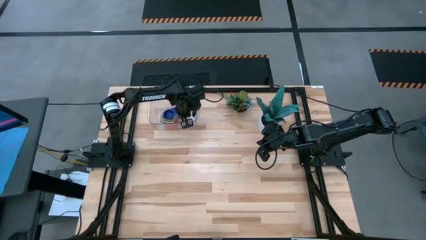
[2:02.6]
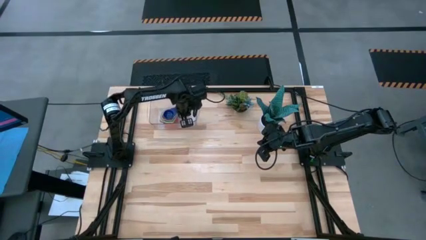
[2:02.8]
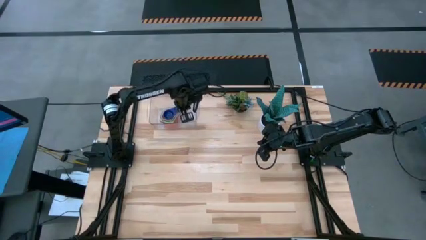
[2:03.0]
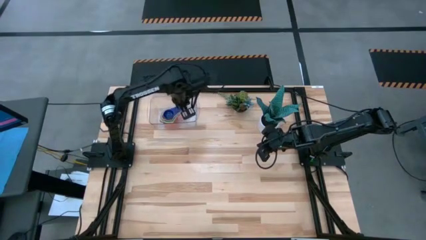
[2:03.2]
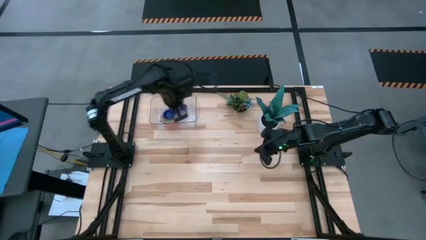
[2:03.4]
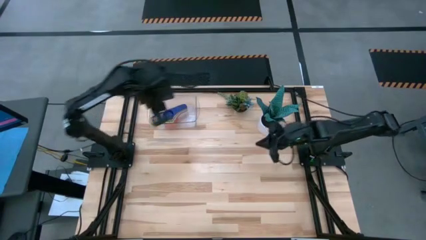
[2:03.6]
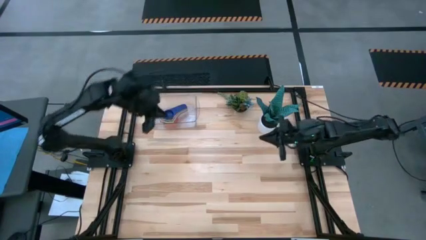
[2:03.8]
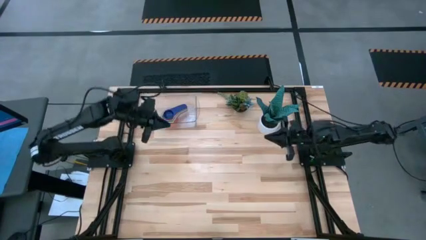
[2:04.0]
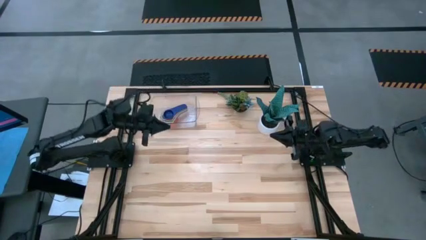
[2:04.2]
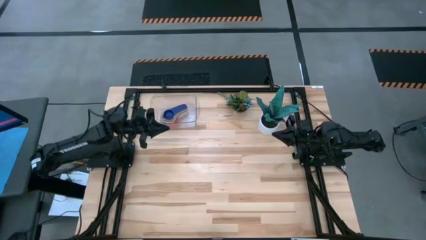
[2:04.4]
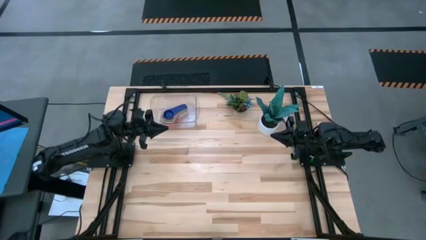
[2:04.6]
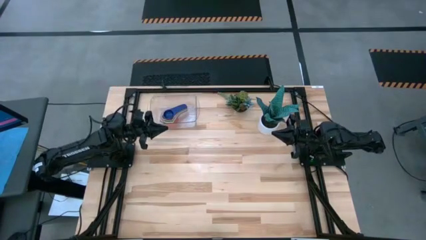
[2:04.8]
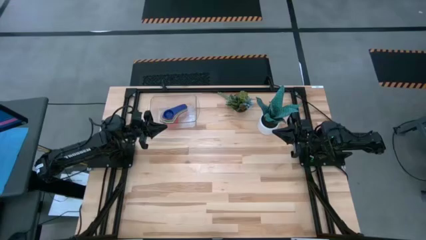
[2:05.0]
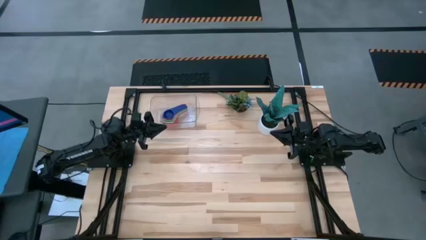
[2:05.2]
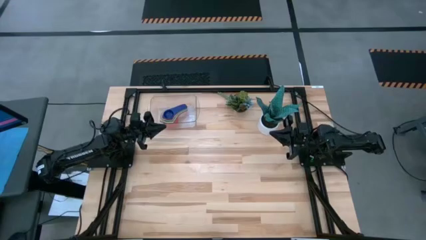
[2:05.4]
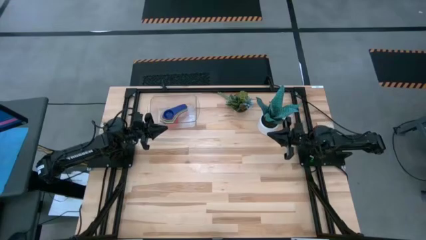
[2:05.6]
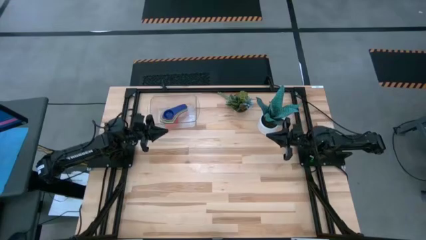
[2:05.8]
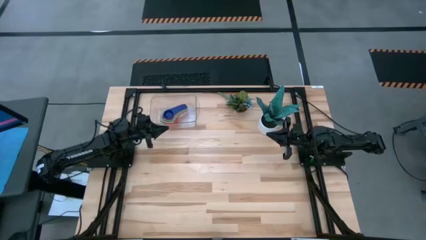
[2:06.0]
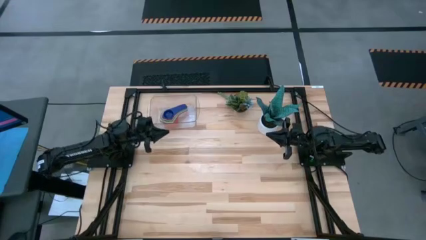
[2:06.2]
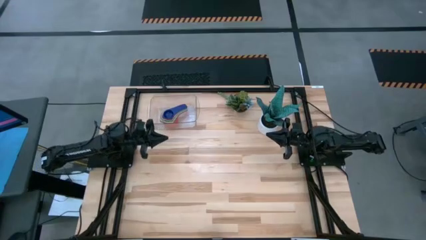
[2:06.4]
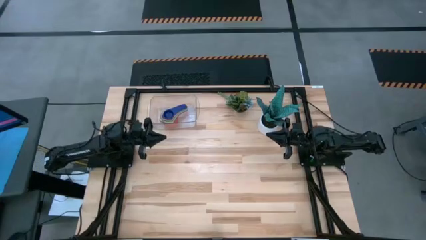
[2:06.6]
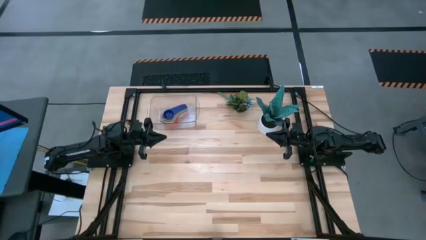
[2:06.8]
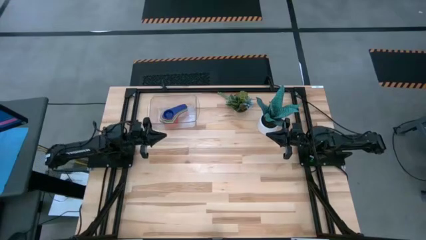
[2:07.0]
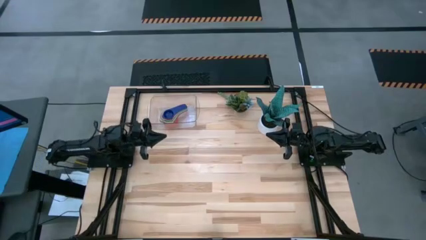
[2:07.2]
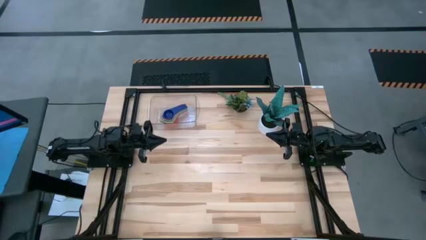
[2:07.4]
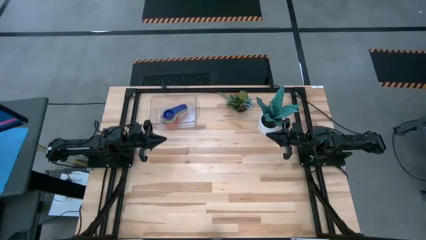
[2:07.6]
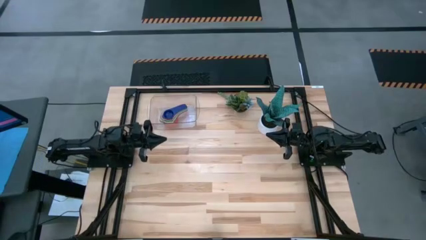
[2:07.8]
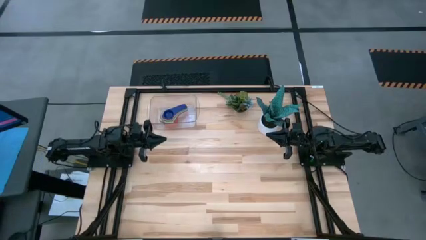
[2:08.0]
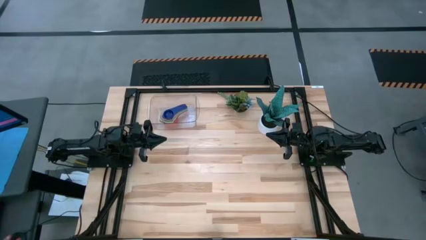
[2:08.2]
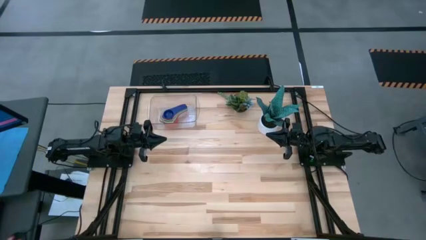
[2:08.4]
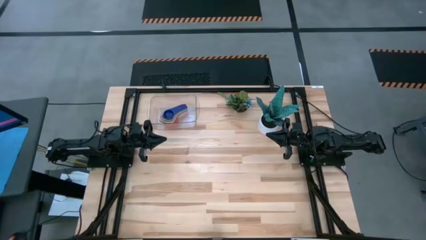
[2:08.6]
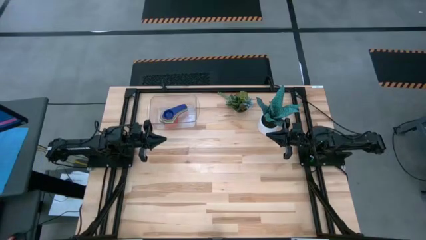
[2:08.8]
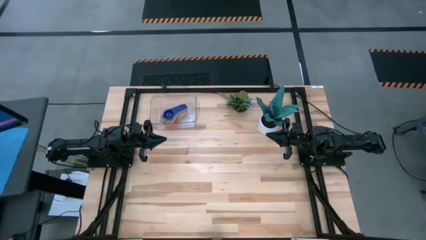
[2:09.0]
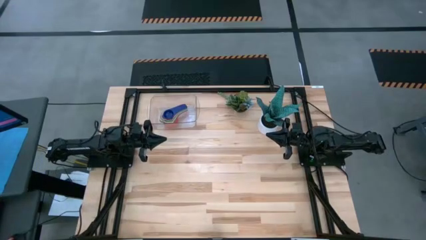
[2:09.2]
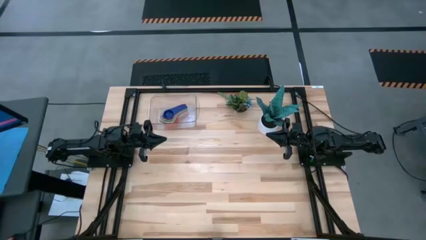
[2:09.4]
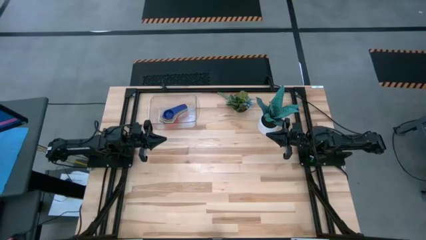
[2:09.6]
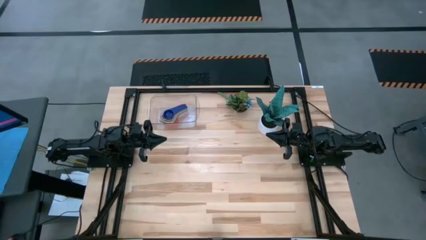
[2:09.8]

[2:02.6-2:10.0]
Task: Nest measuring cups in basket
Return to Home Position

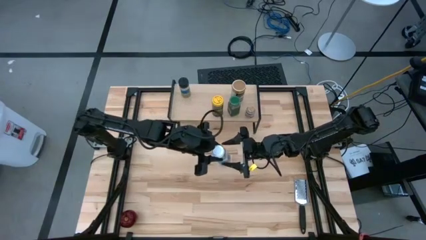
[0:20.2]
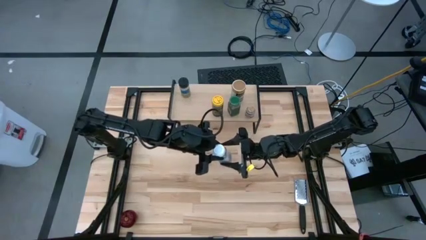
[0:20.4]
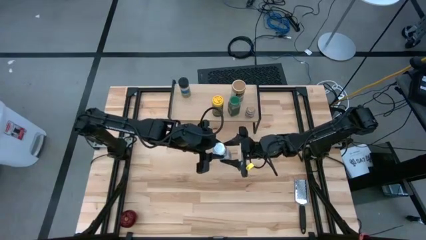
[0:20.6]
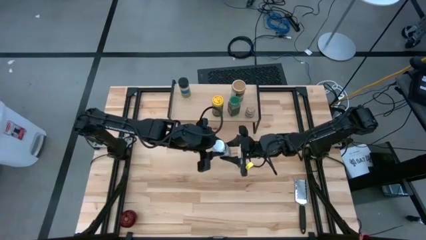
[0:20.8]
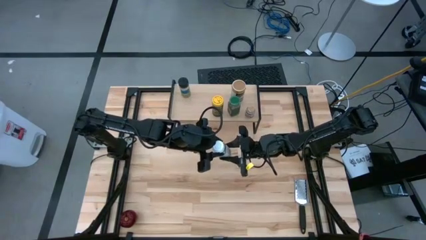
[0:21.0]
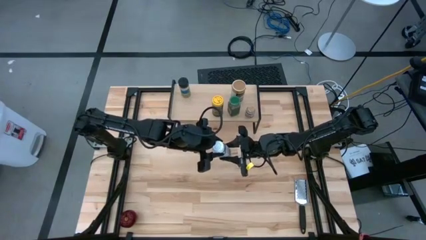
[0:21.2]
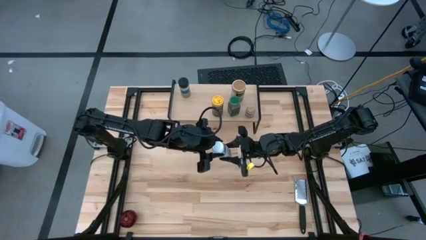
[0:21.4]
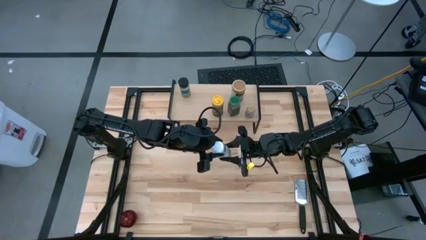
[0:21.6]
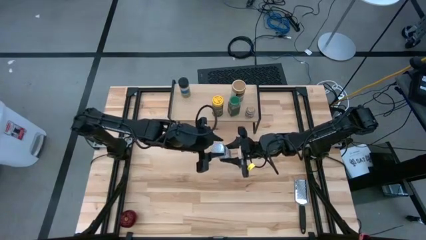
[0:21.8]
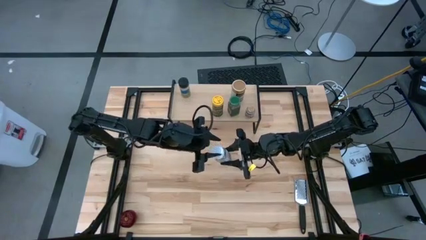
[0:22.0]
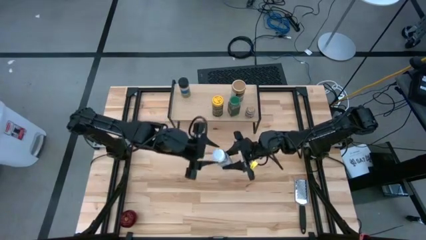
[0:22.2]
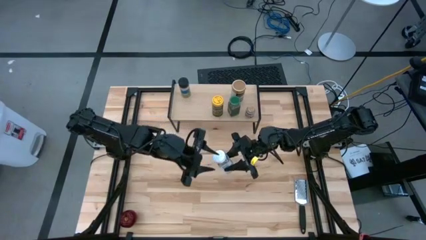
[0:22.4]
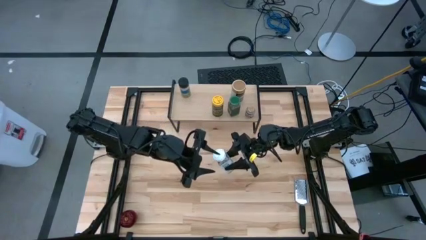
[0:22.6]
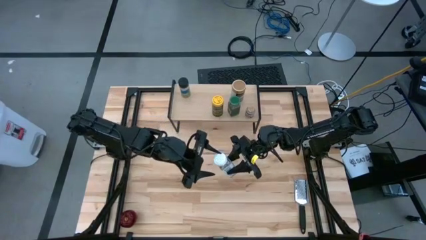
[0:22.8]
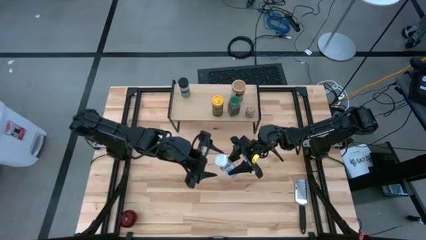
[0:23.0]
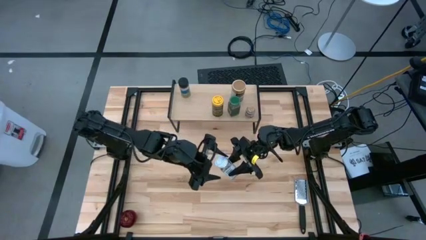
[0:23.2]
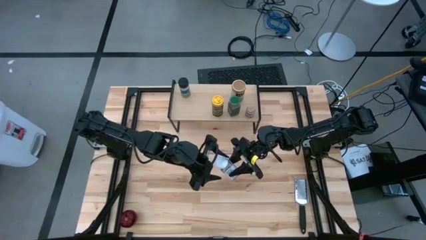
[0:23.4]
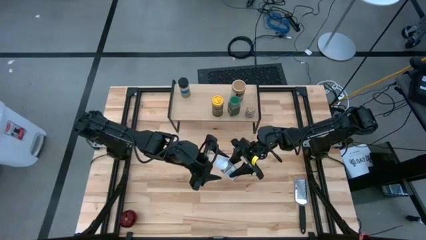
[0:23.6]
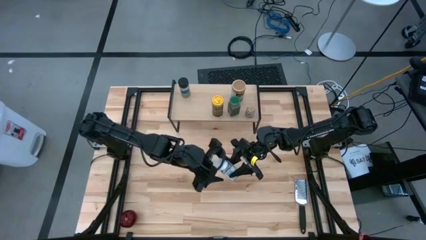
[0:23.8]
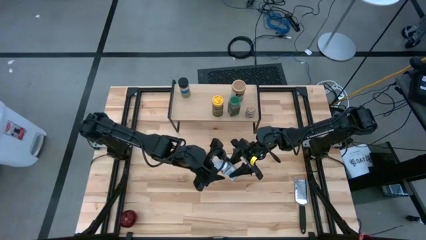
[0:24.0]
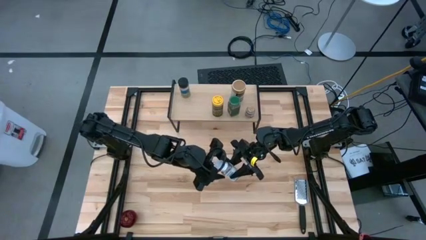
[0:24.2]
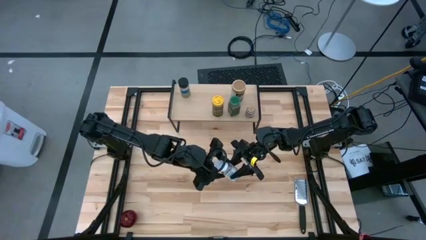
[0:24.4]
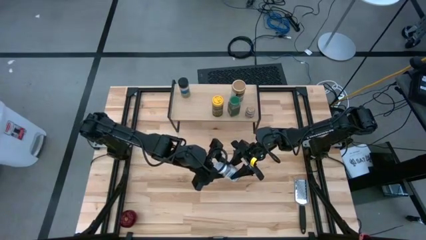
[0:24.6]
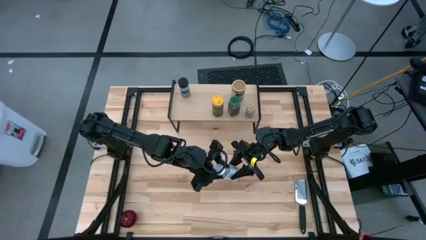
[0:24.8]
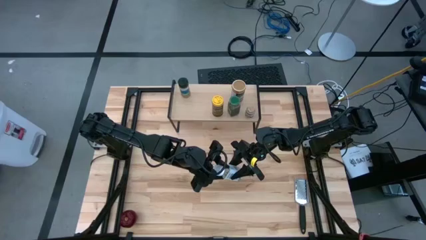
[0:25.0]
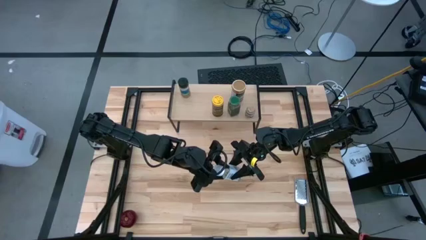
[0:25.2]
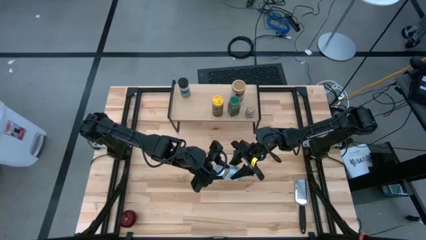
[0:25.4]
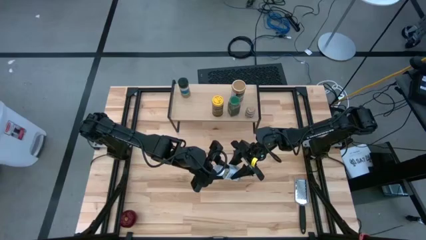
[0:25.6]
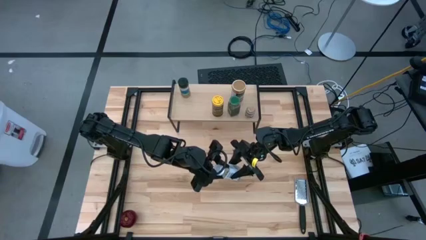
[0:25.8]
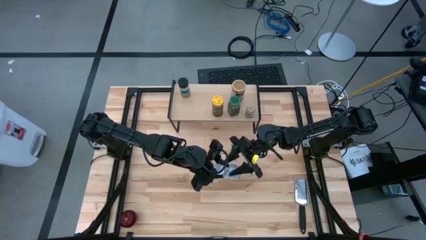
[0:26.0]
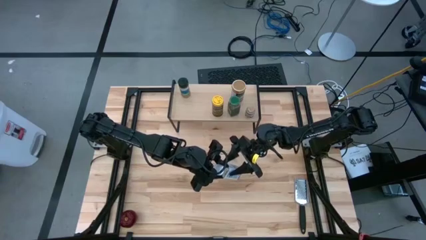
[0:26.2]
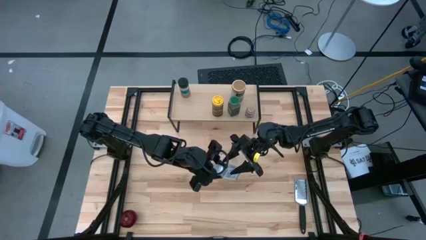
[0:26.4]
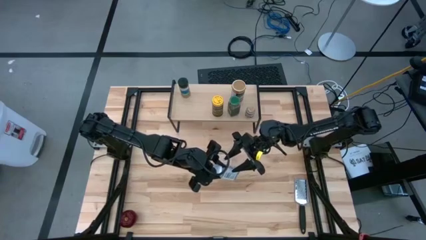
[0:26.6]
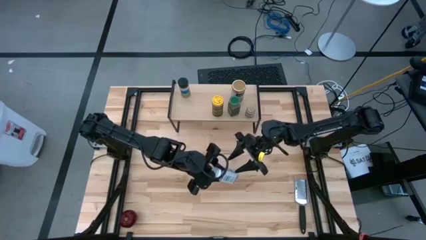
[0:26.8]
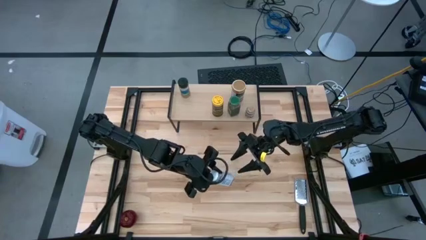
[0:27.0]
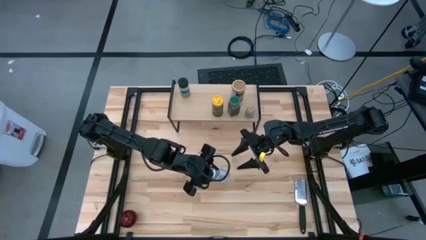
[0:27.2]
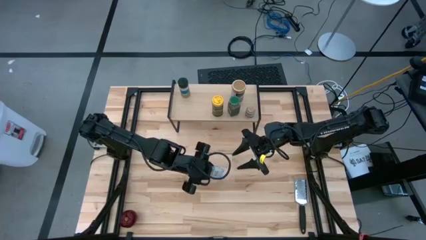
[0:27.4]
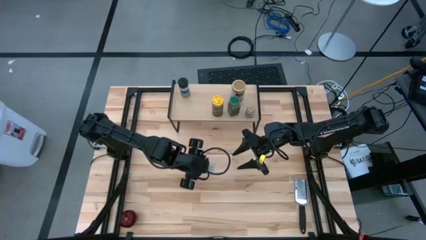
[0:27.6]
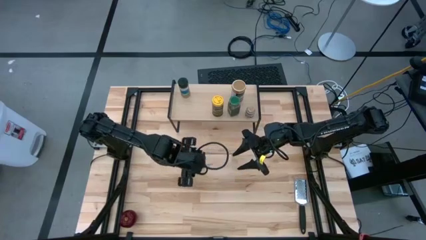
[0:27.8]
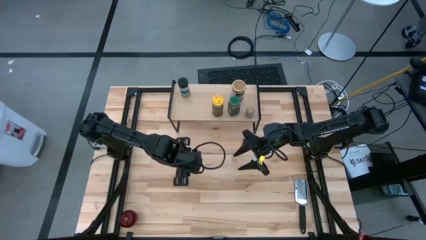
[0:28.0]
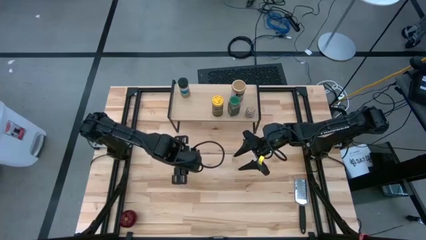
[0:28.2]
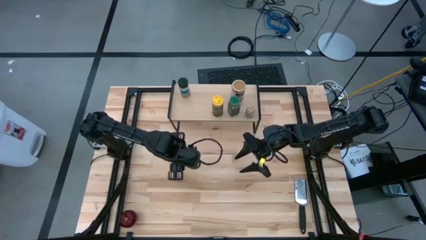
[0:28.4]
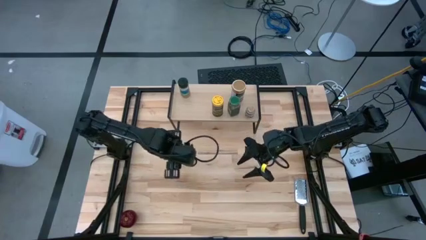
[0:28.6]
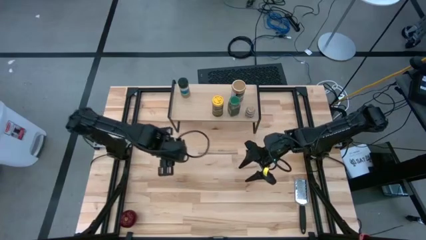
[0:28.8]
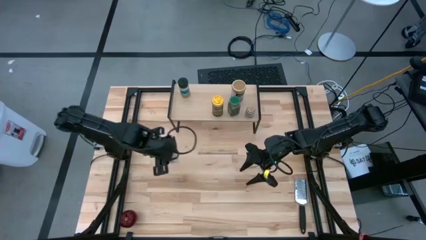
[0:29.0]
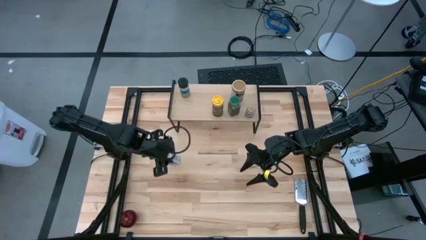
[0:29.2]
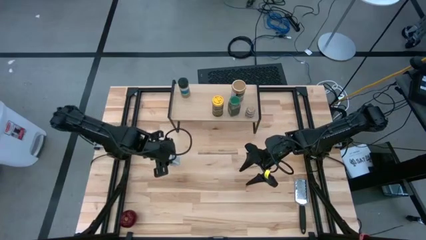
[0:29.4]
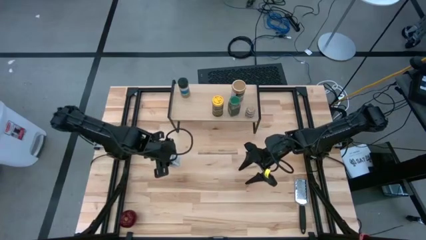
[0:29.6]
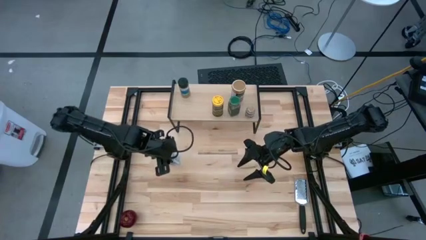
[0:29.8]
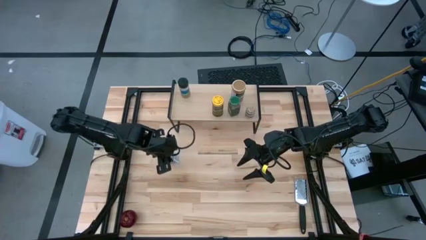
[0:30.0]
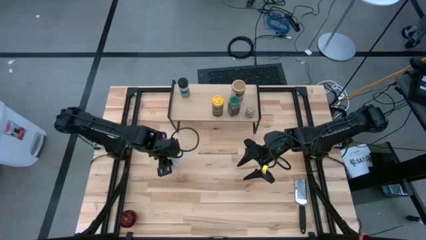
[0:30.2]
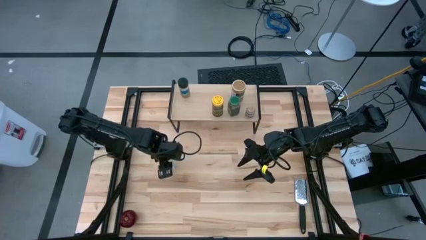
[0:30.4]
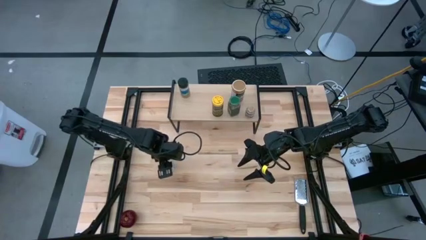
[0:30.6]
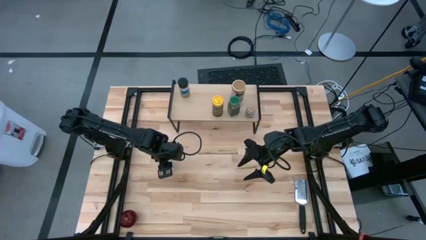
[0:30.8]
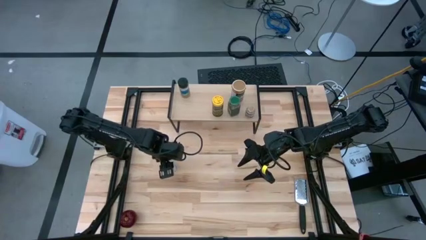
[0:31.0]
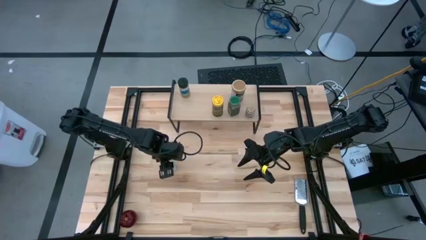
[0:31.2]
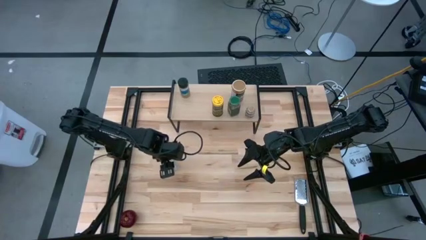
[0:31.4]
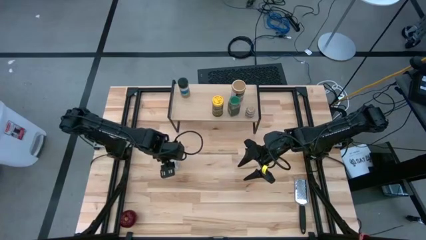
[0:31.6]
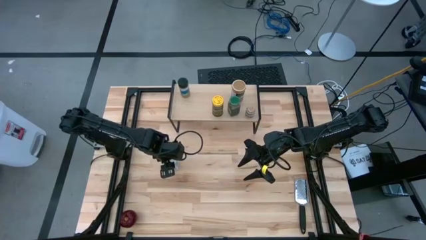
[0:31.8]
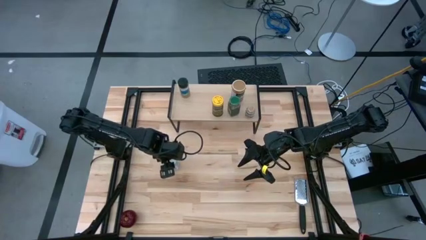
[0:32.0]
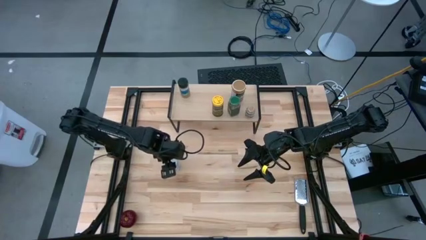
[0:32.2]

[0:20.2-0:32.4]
Task: Shelf spices
Remove the white seasoning bottle from the shelf
